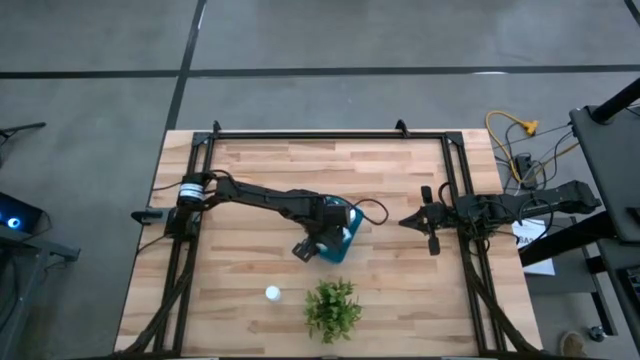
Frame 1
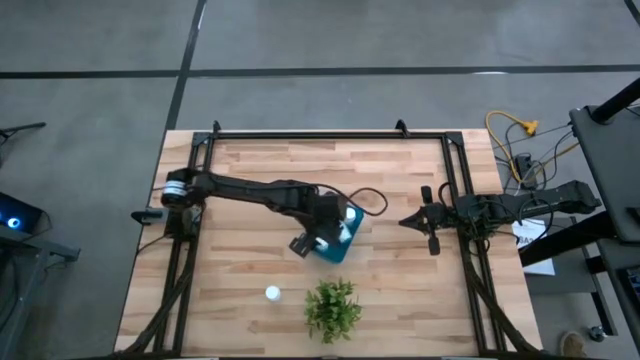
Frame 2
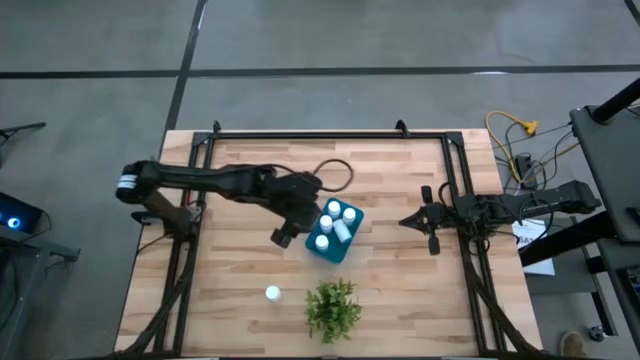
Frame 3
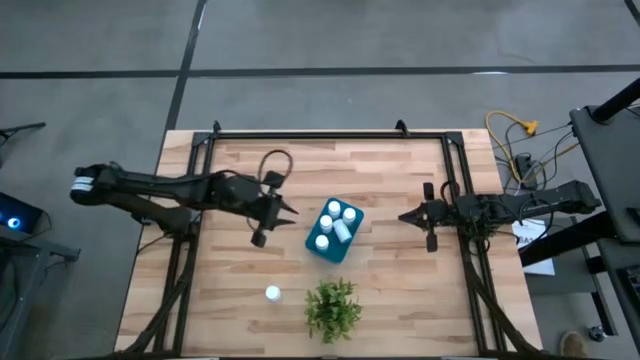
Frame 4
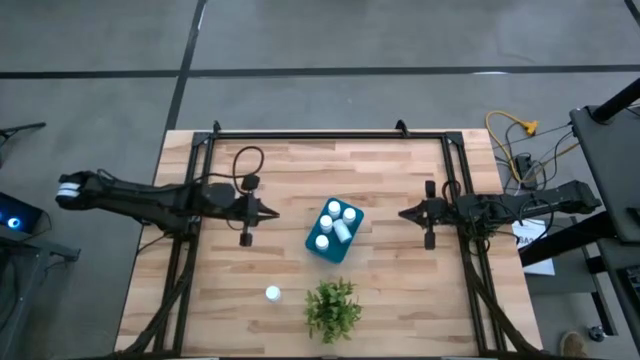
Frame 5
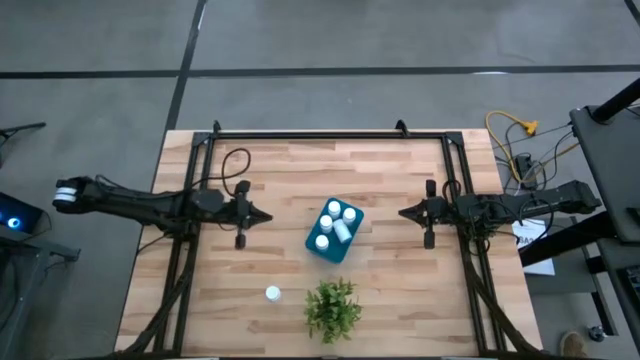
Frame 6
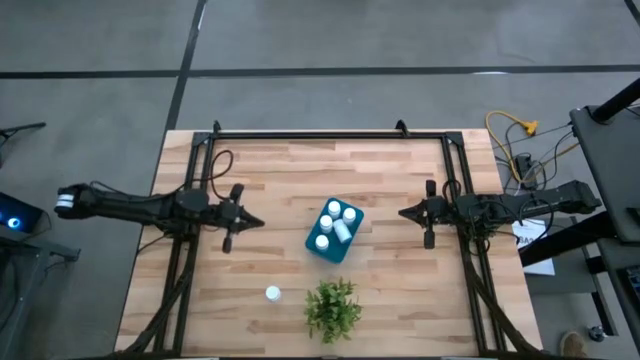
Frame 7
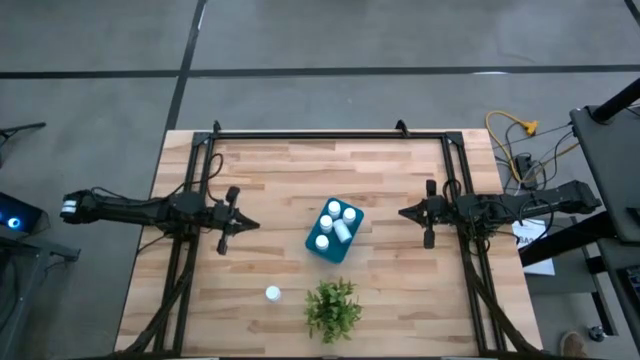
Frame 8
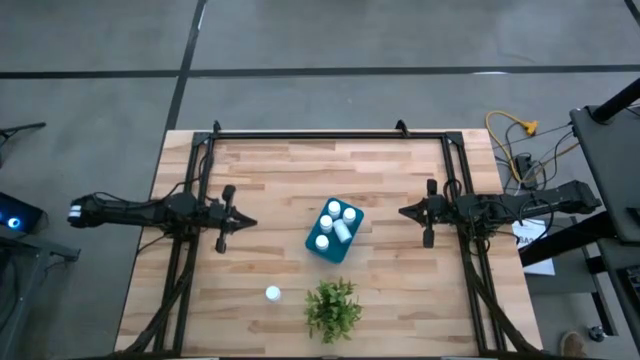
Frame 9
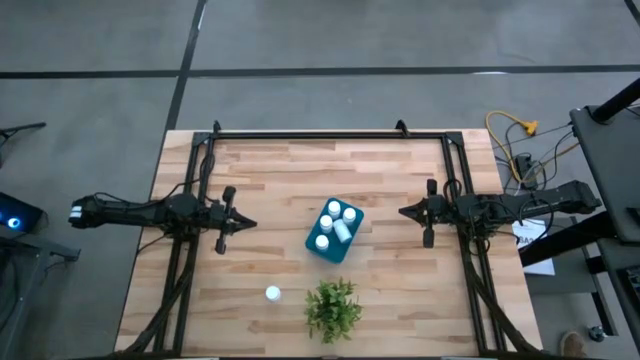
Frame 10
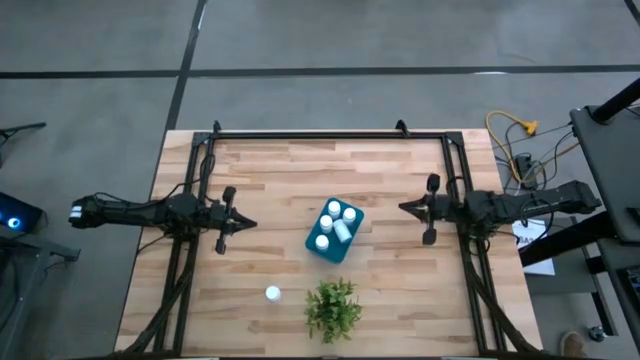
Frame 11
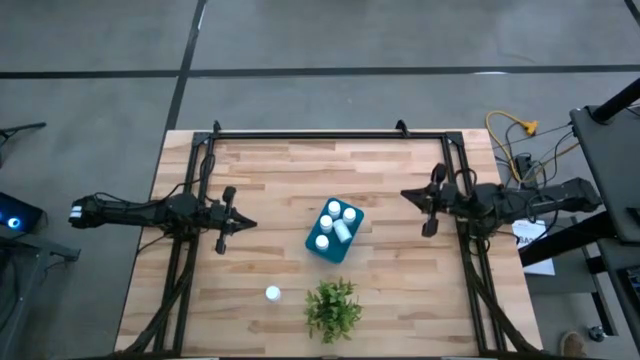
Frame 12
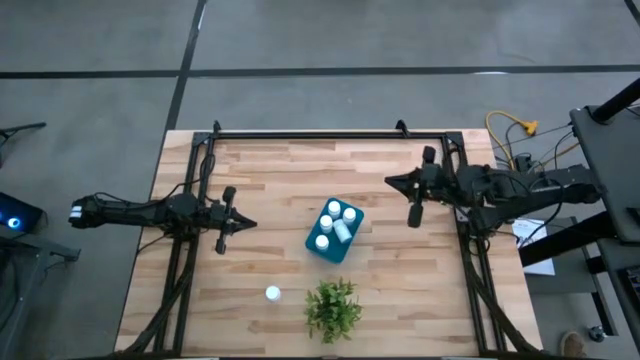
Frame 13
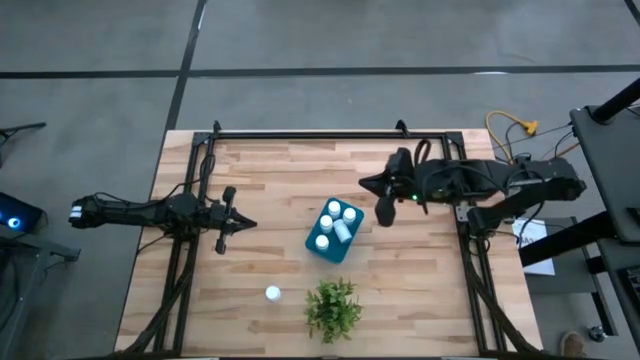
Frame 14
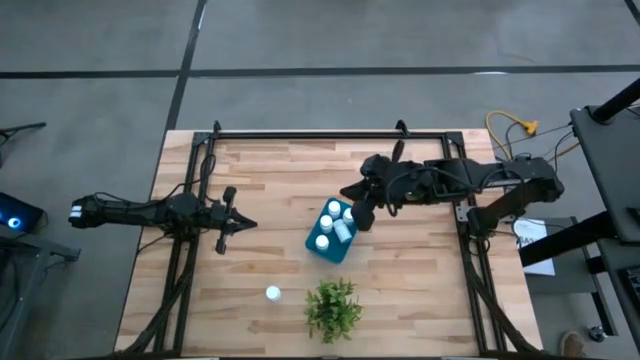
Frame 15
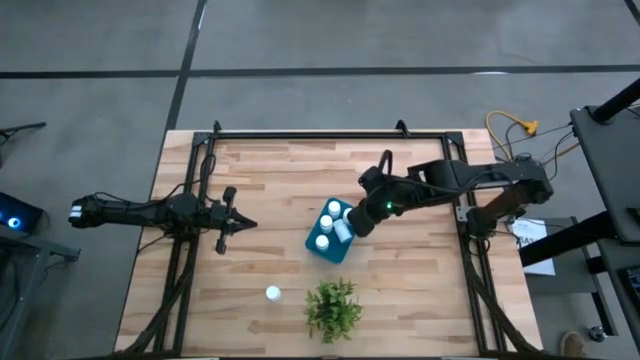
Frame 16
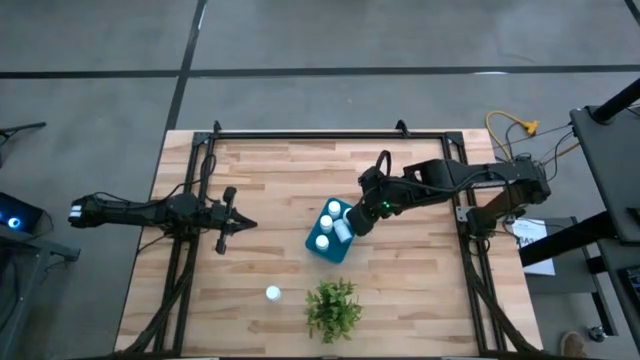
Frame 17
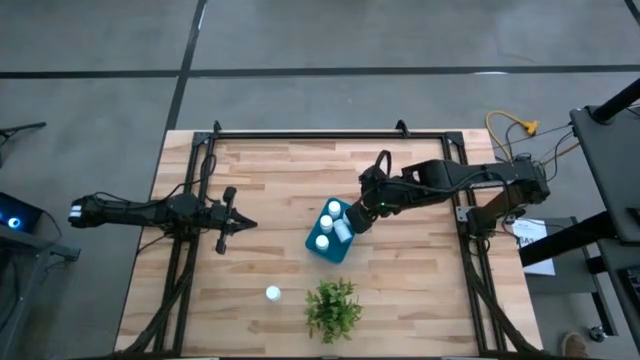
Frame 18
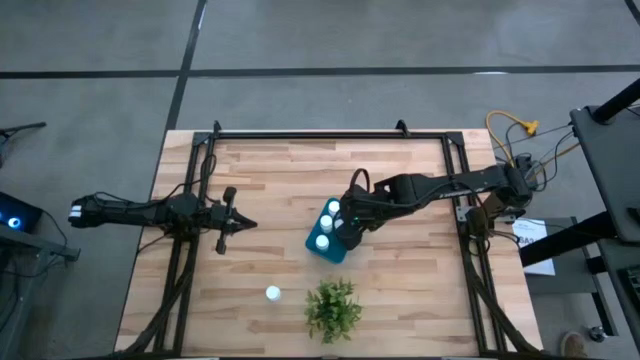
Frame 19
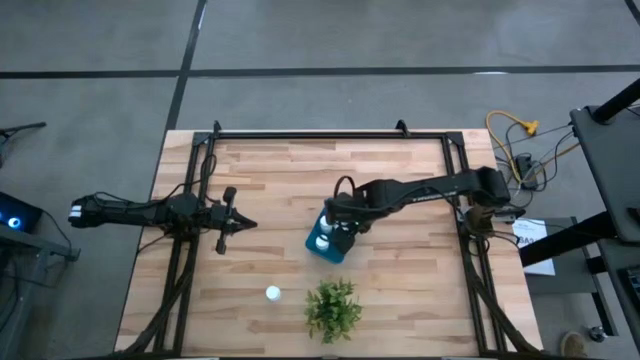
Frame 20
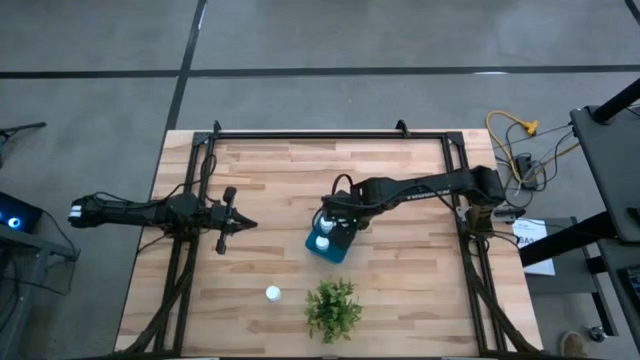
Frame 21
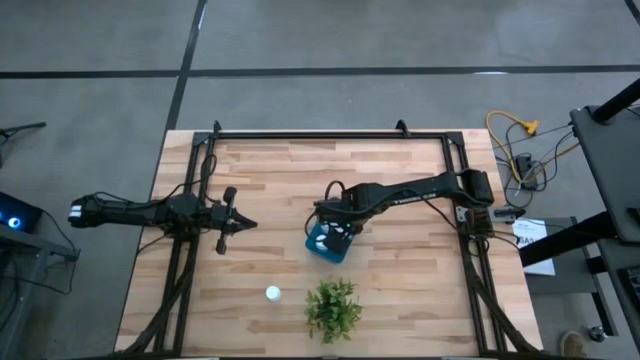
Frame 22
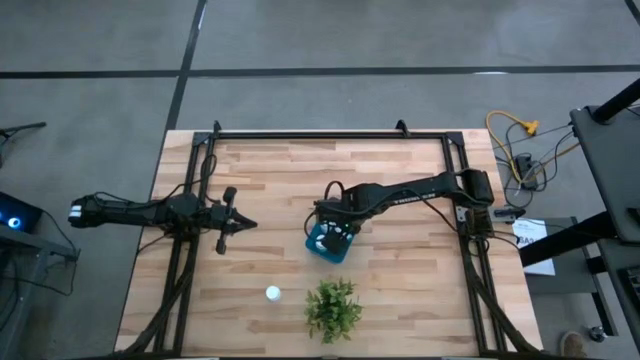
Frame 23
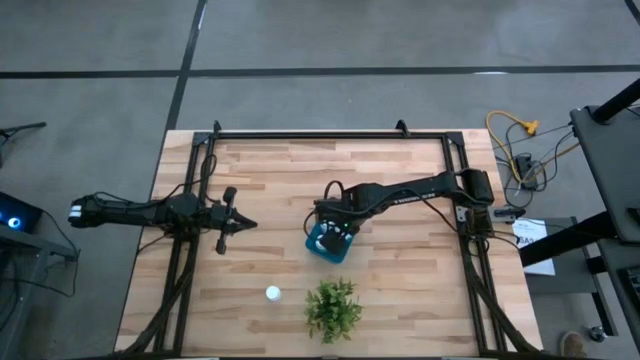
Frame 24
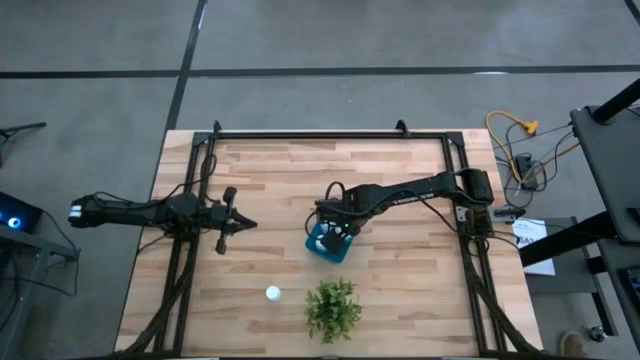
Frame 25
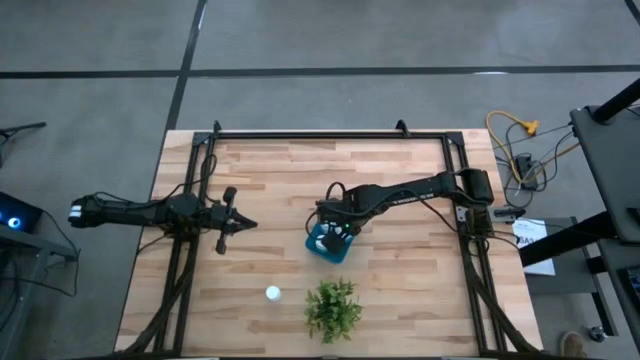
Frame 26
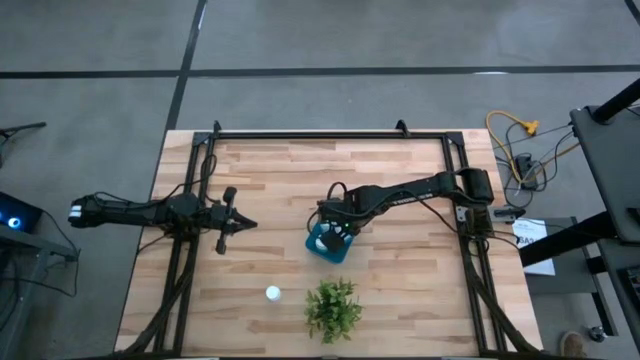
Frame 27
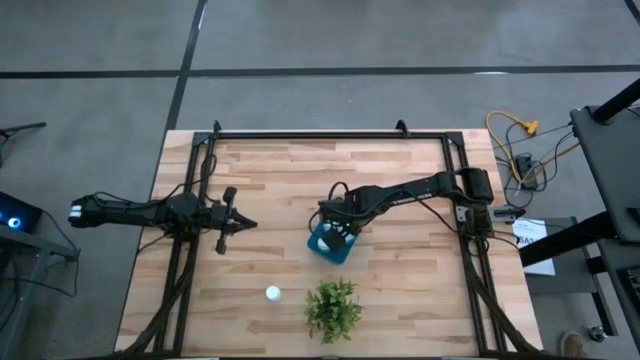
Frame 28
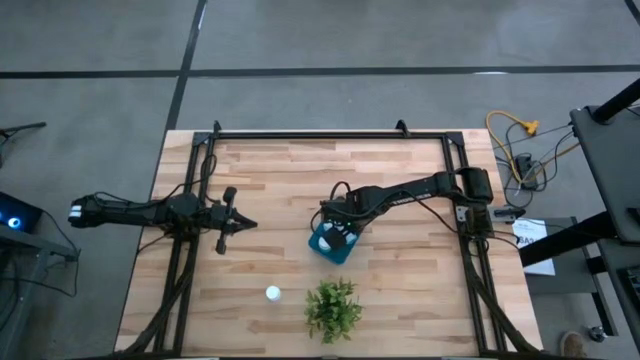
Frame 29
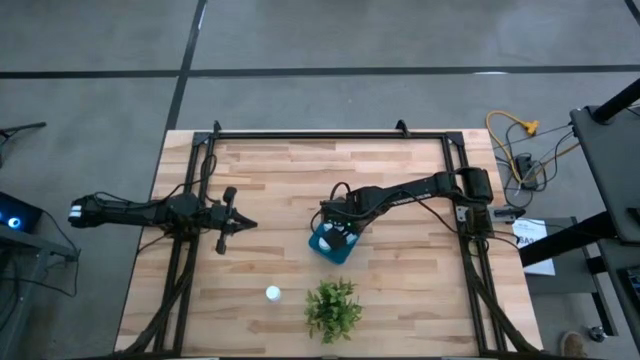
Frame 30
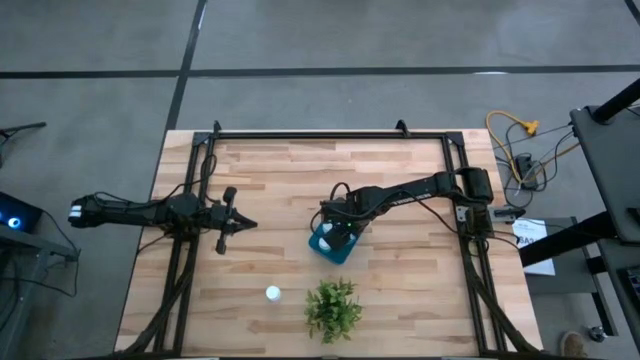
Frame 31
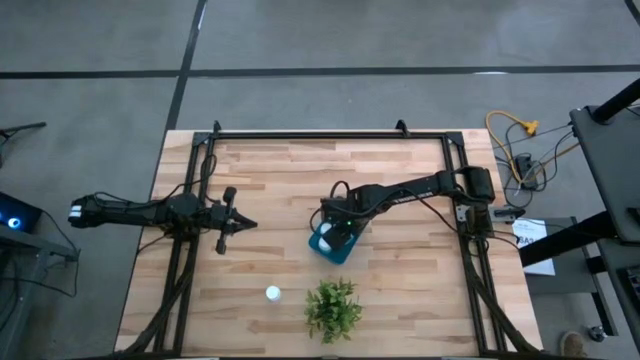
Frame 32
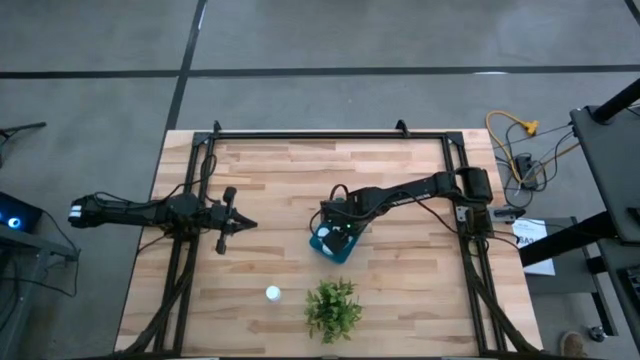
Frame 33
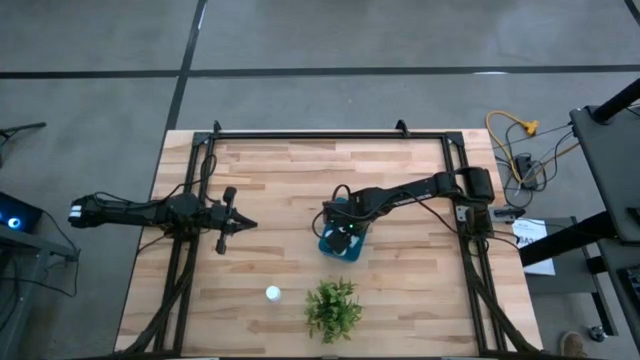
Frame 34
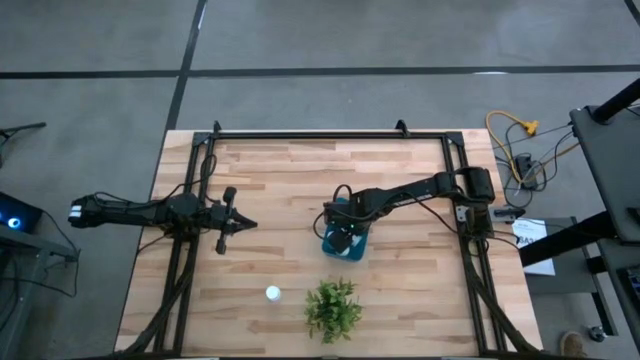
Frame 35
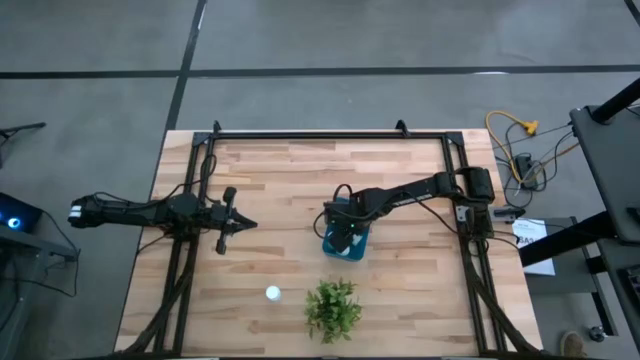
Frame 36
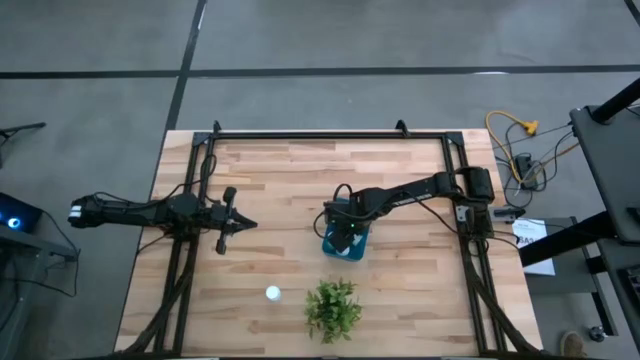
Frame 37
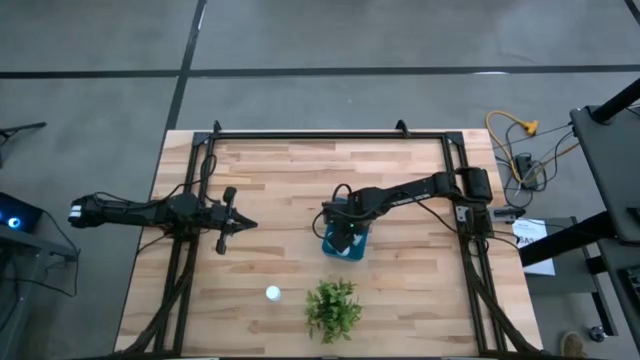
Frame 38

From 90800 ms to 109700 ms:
Task: Pick and place pill bottles into a basket
Put the white pill bottle into the blue bin

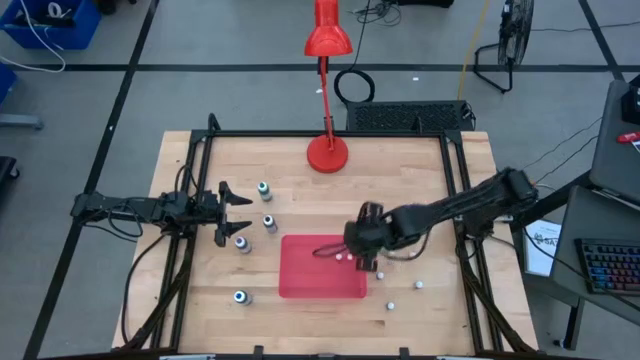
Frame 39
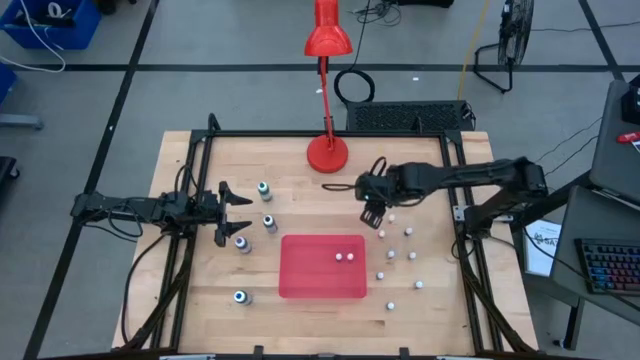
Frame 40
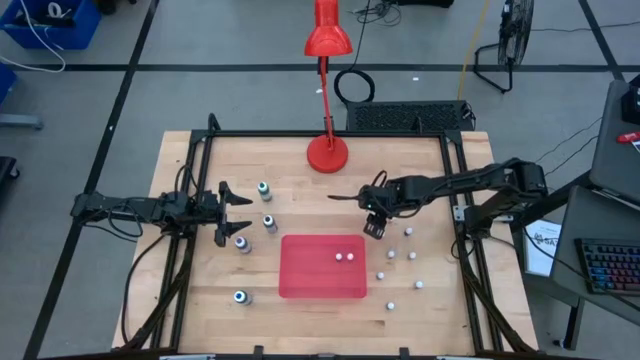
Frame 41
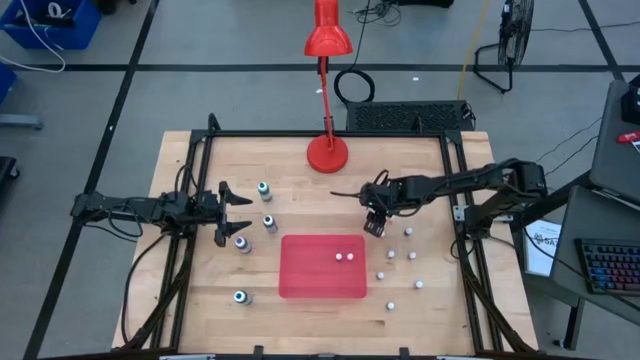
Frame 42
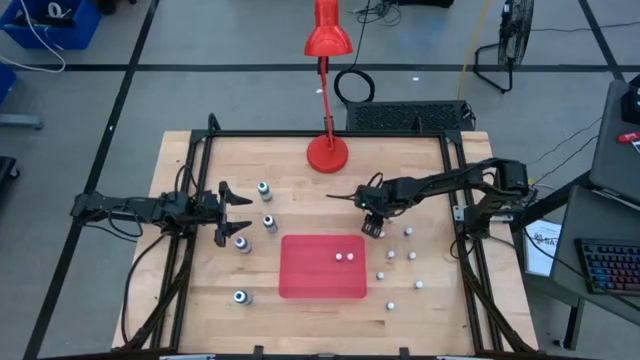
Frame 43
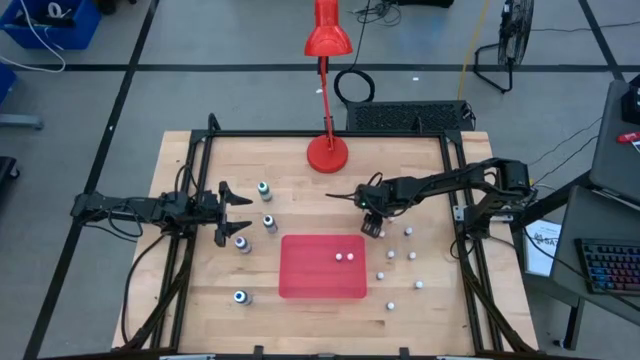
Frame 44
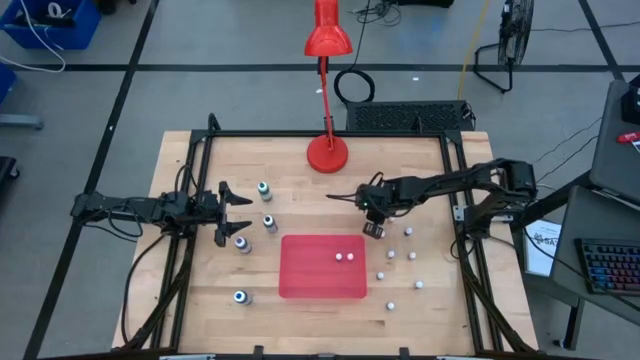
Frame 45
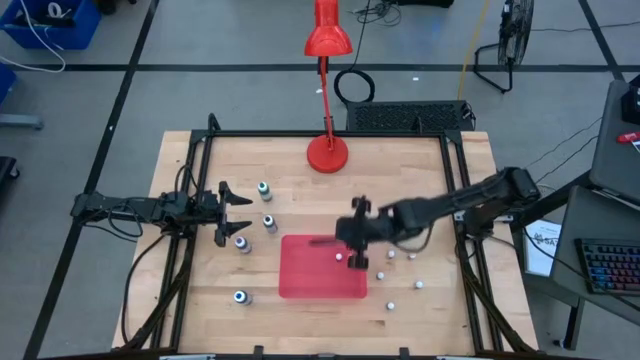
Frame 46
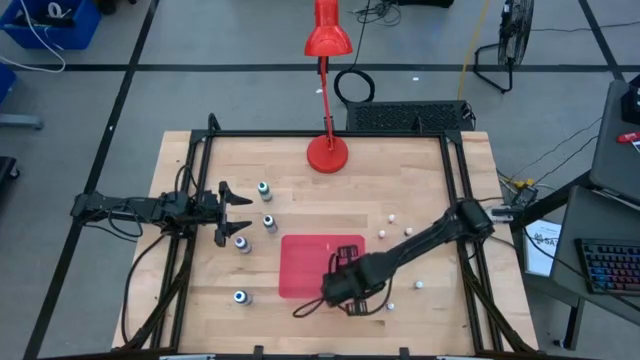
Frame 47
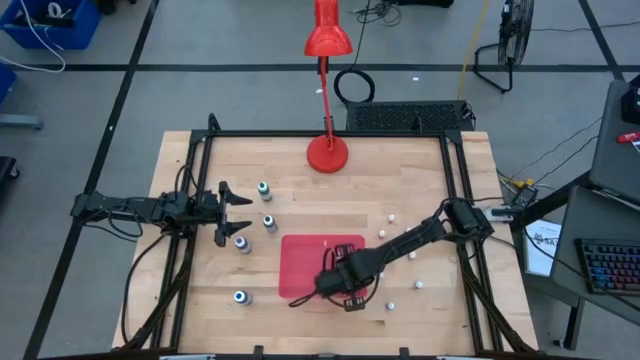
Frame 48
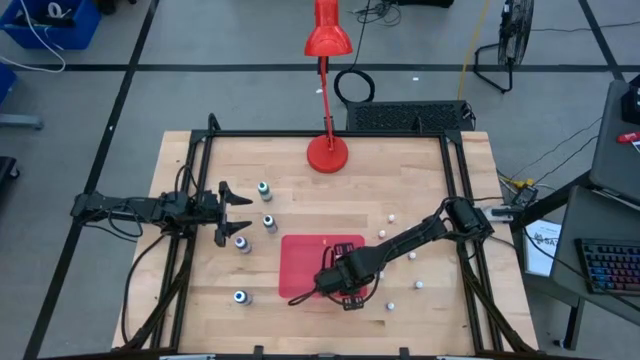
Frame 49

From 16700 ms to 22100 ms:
Task: Pick & Place food coloring
Put the small yellow food coloring bottle into the pink container
